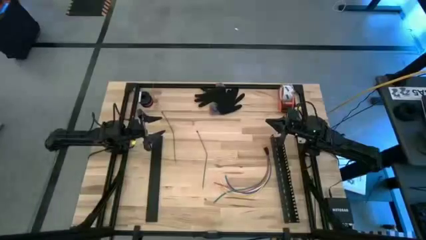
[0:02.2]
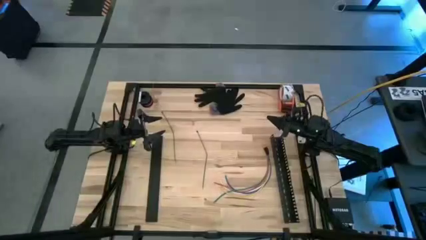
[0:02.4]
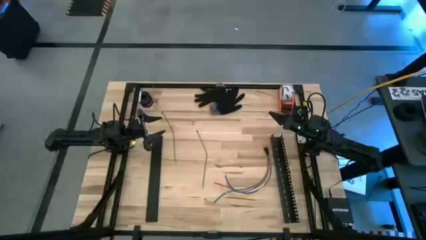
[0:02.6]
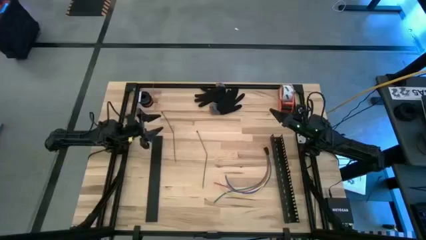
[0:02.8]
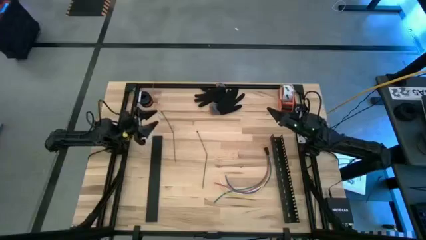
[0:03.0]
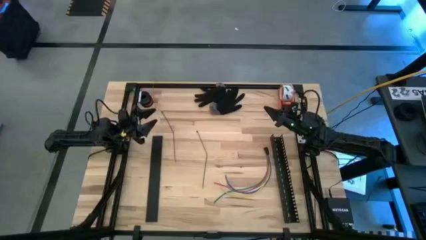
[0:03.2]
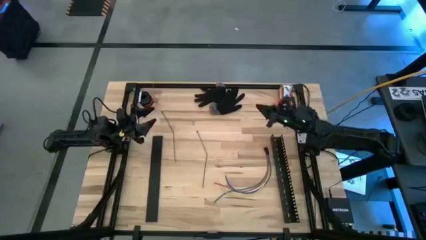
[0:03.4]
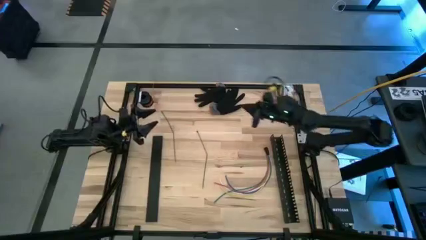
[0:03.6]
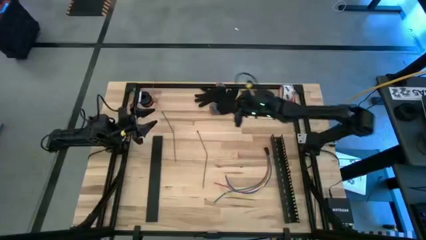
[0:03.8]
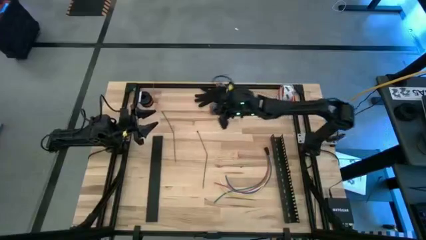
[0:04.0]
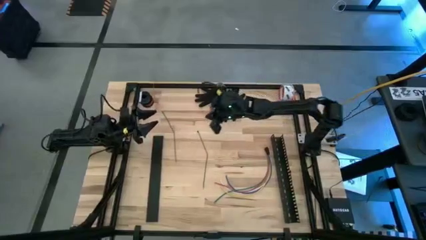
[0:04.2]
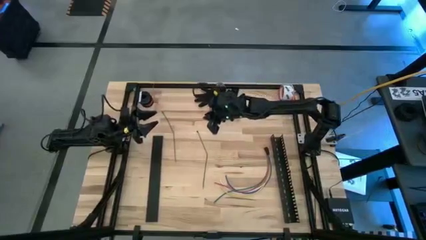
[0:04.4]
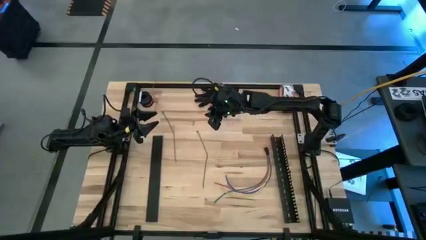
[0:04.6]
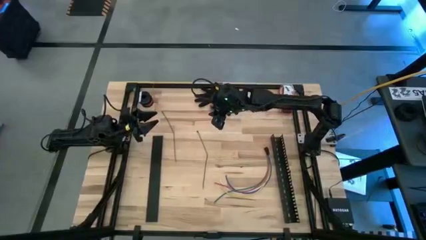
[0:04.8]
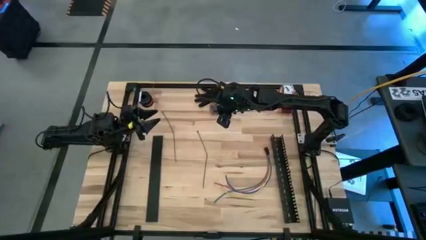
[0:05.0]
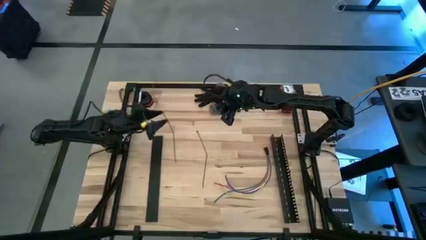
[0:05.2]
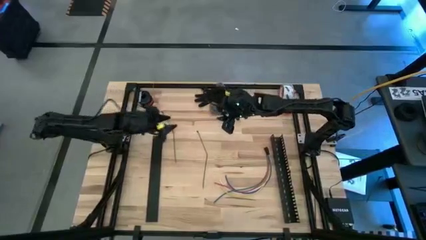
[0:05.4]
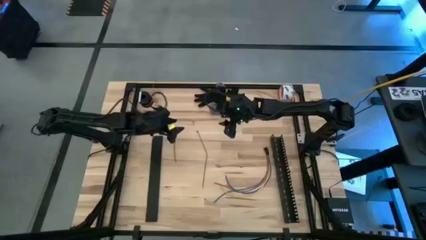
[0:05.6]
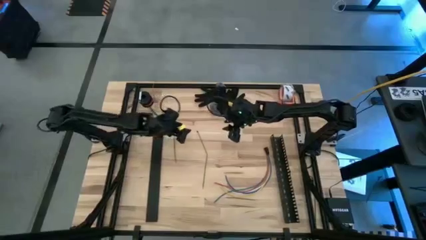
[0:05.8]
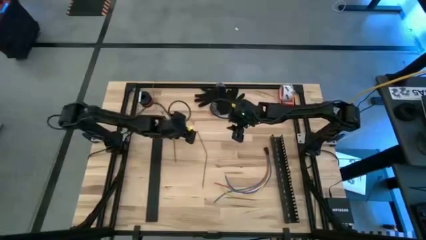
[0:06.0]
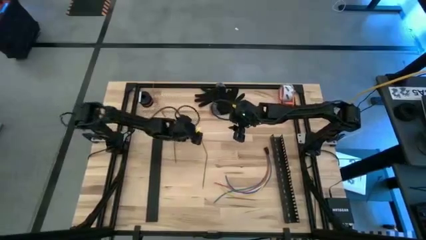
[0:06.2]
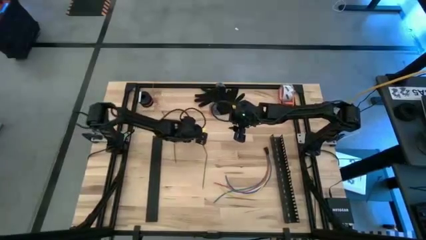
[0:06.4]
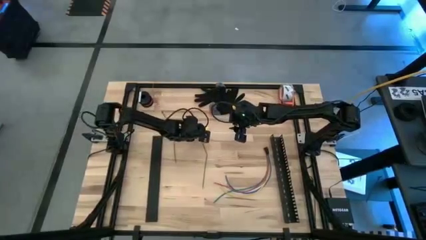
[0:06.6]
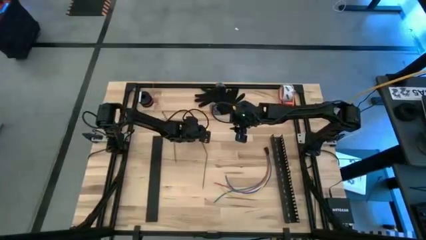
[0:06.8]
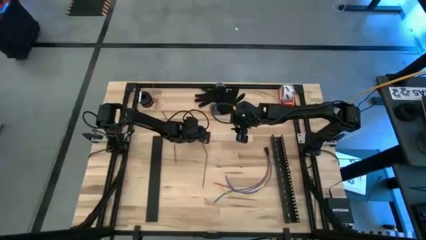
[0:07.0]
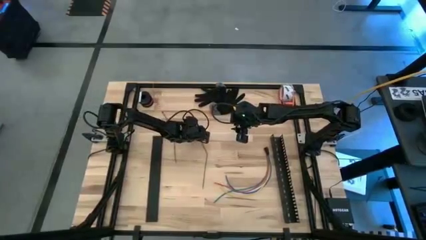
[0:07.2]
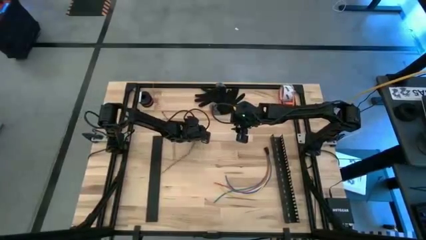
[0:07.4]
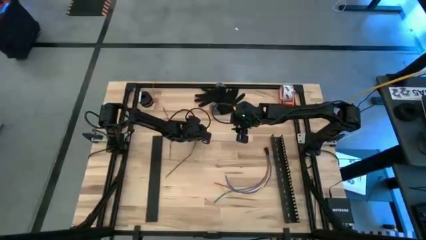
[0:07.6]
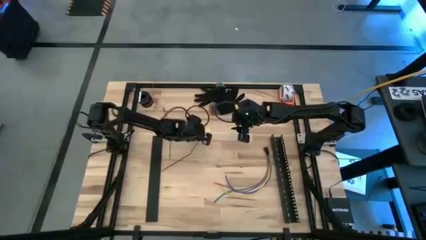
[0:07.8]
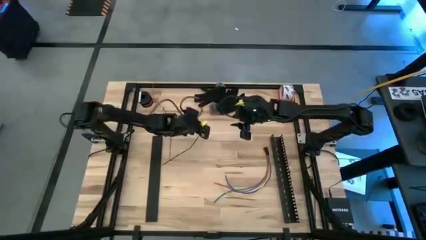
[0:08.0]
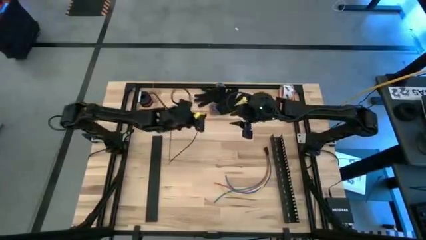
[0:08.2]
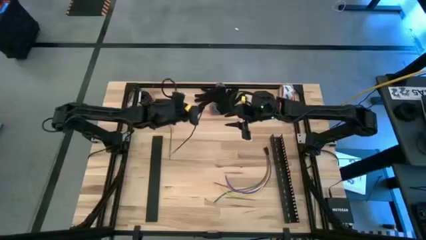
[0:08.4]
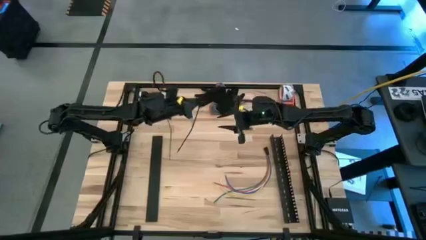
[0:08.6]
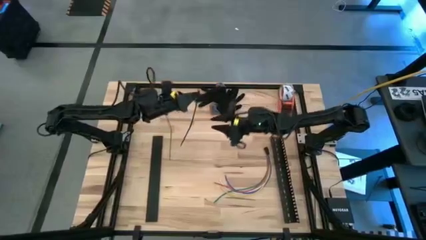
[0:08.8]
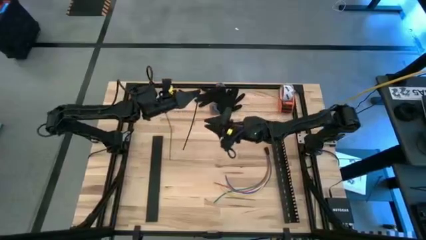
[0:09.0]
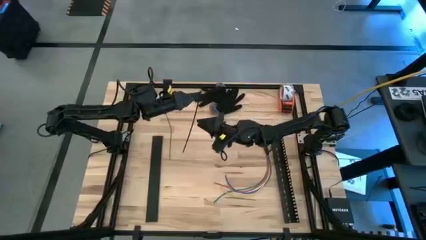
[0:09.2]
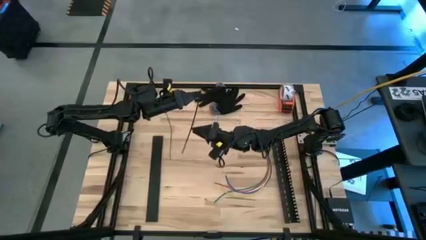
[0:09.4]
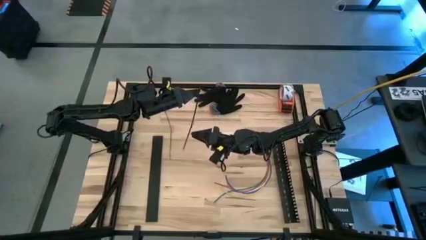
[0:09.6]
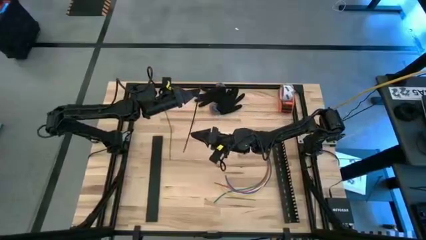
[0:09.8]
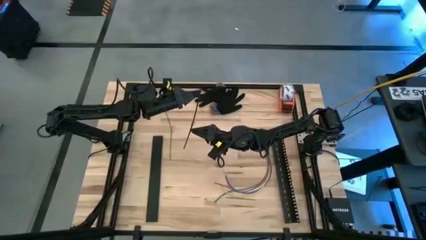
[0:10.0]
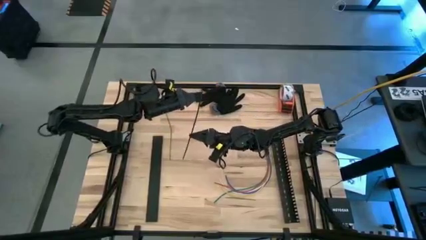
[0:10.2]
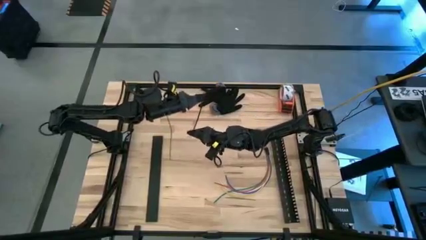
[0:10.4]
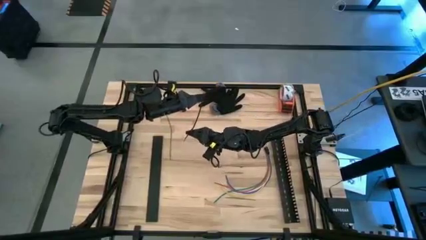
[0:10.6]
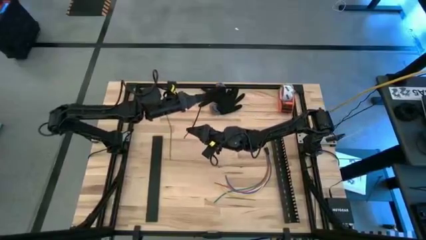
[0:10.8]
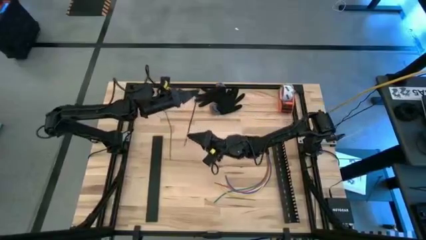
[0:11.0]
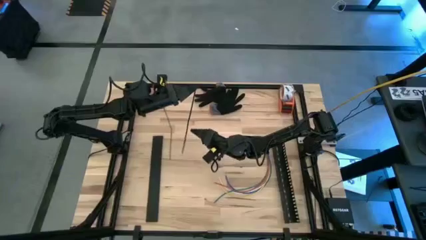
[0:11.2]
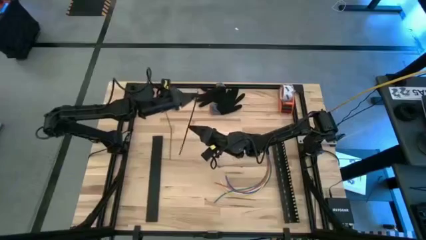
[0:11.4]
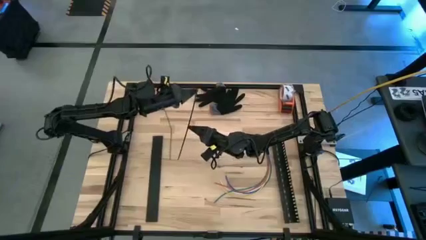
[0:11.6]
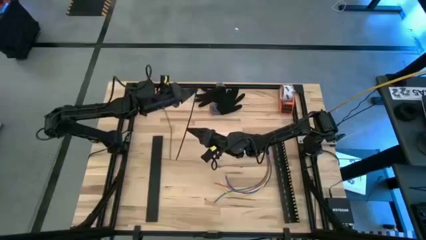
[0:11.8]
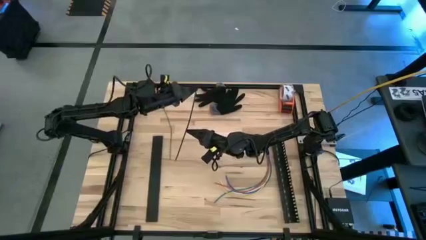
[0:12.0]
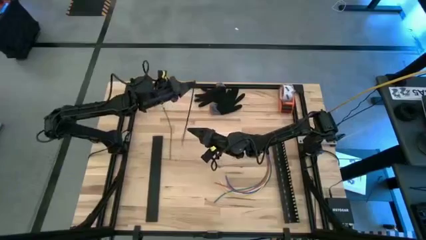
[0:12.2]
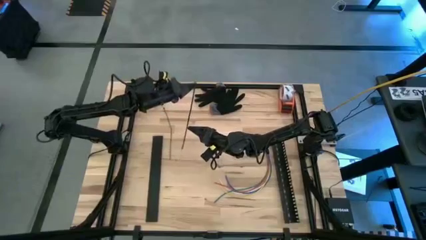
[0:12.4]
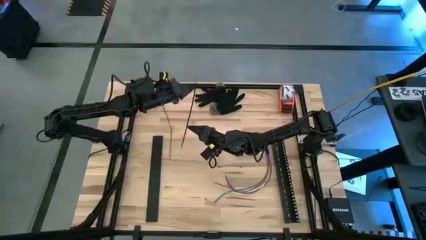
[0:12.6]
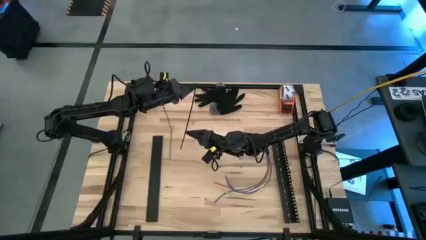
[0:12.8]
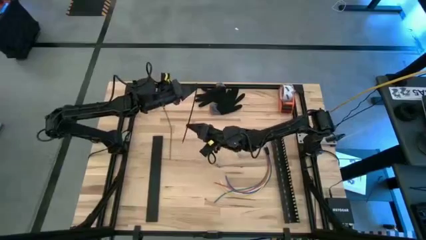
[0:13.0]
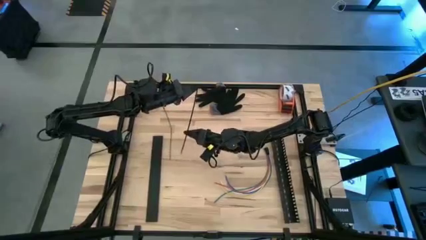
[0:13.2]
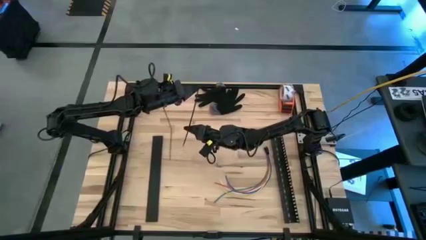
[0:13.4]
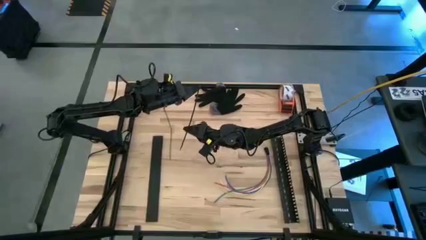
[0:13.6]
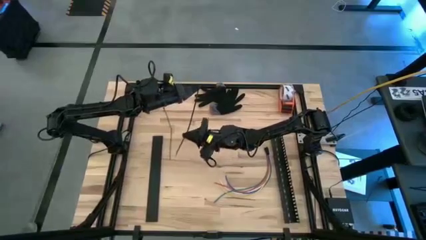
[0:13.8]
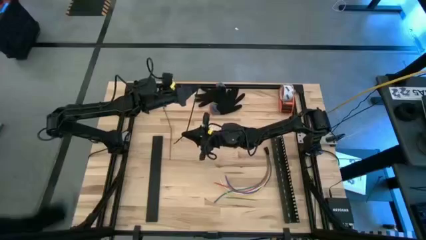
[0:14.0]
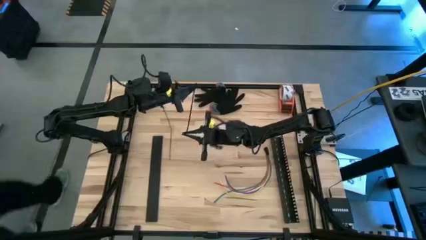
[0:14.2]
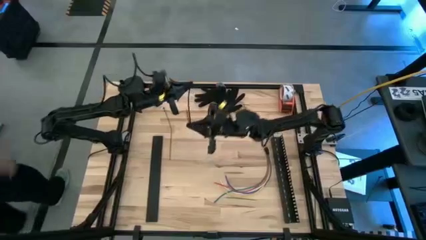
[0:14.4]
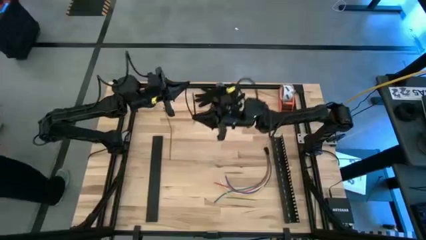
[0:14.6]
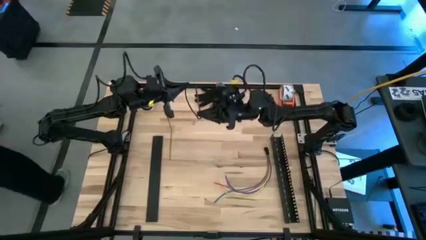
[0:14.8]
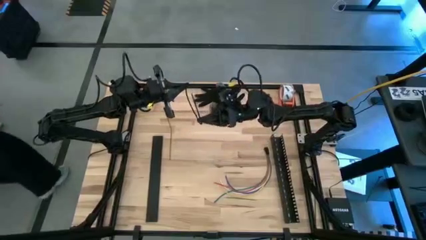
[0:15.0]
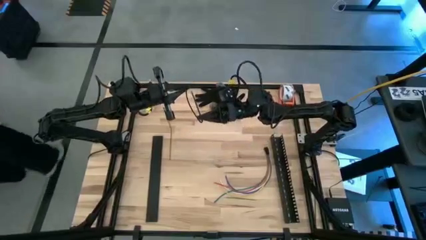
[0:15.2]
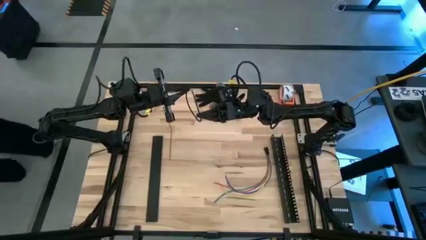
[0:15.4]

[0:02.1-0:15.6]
Task: Ziptie cables
Insert the right black zip tie into the locking head
